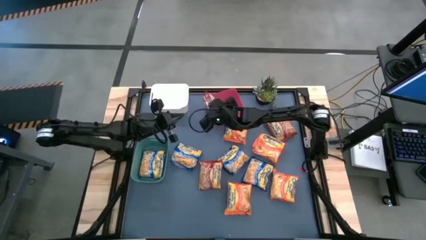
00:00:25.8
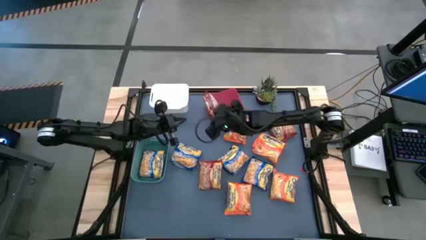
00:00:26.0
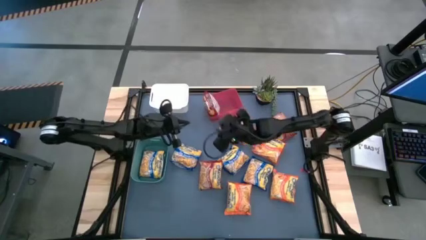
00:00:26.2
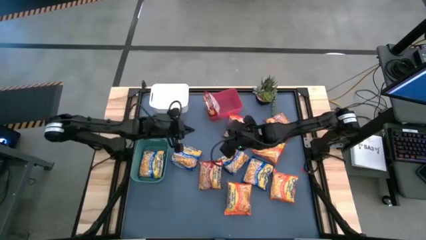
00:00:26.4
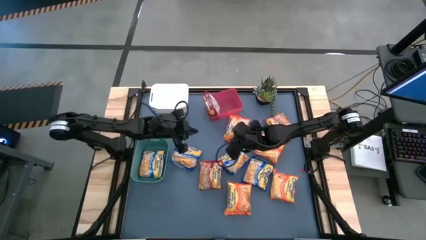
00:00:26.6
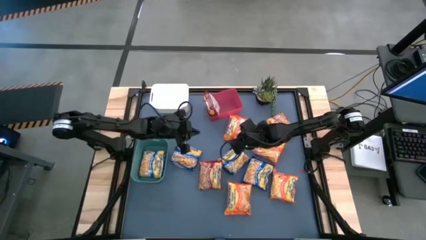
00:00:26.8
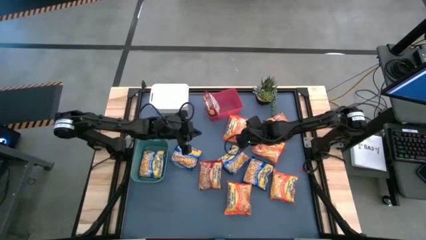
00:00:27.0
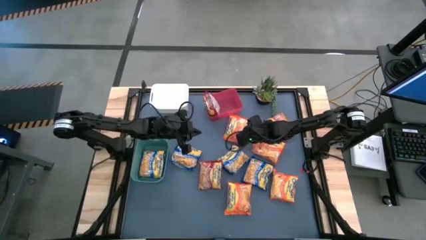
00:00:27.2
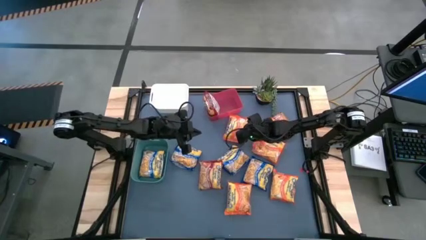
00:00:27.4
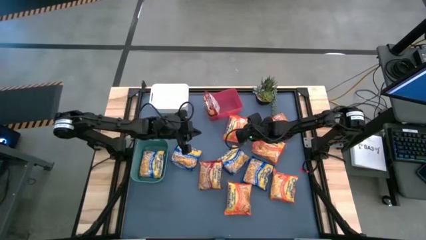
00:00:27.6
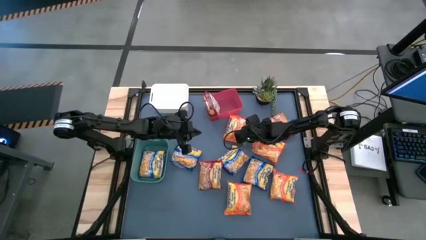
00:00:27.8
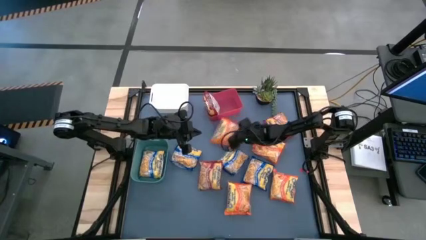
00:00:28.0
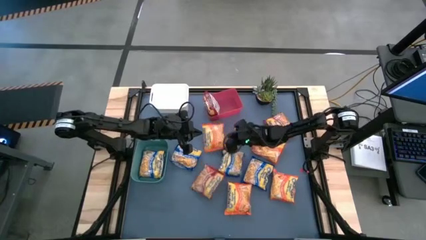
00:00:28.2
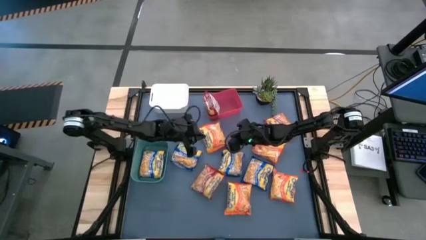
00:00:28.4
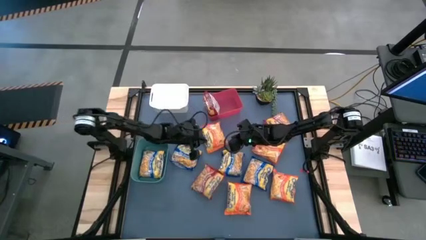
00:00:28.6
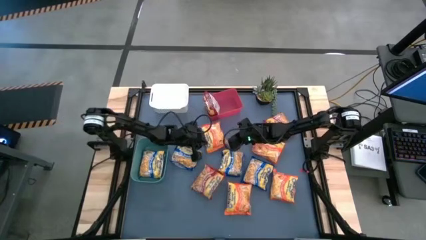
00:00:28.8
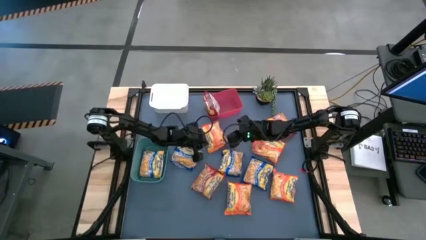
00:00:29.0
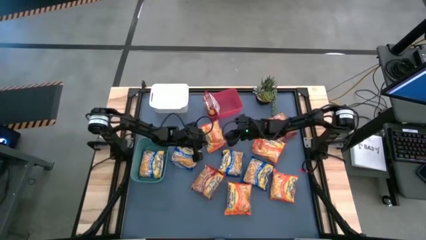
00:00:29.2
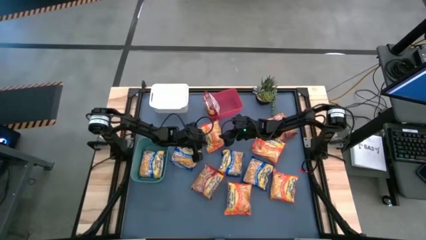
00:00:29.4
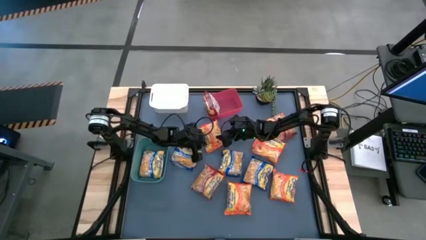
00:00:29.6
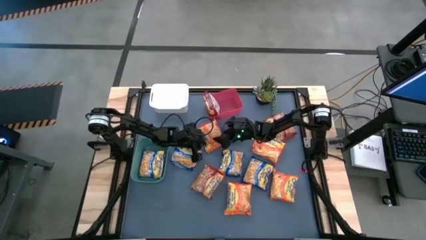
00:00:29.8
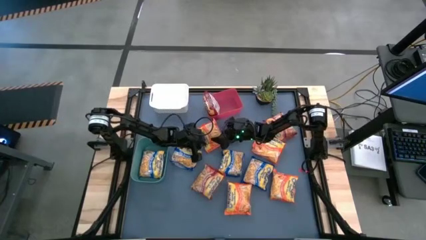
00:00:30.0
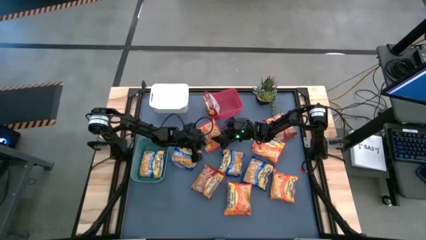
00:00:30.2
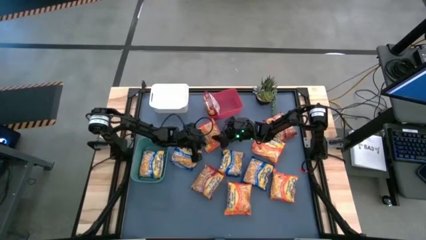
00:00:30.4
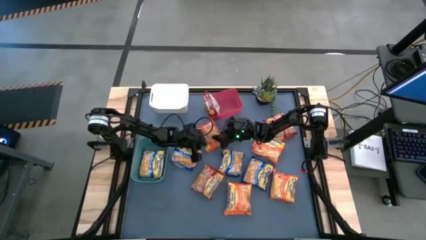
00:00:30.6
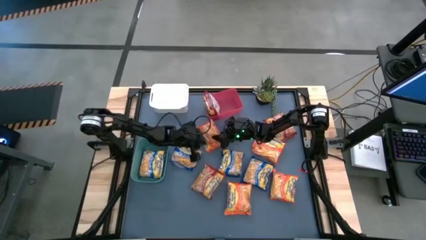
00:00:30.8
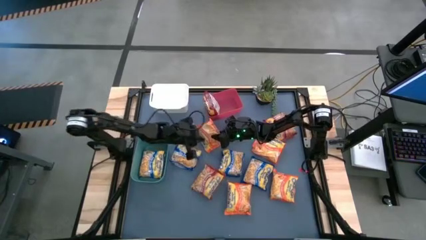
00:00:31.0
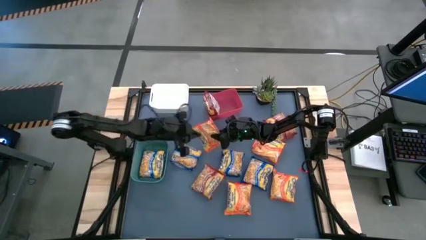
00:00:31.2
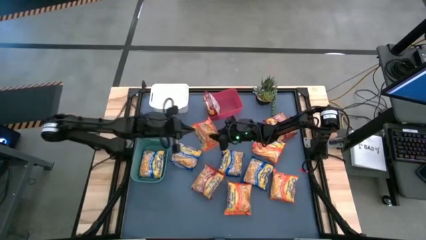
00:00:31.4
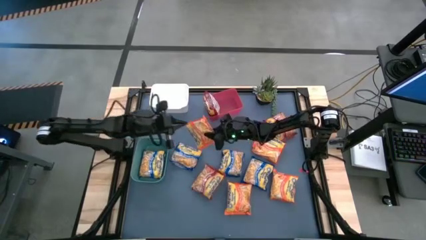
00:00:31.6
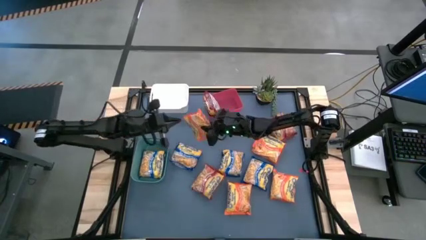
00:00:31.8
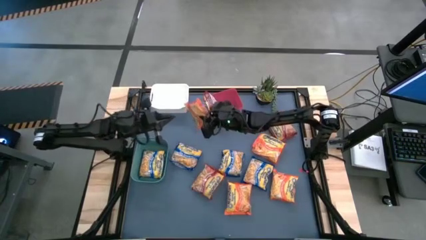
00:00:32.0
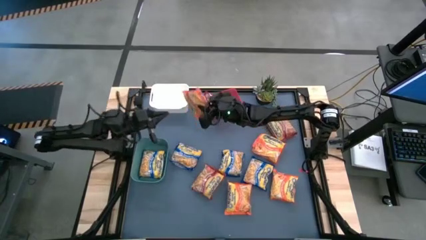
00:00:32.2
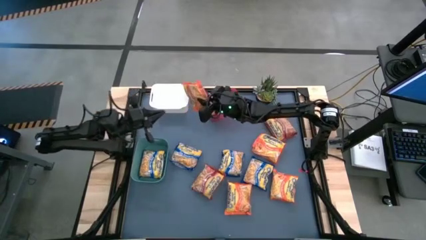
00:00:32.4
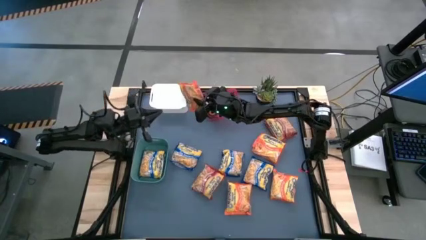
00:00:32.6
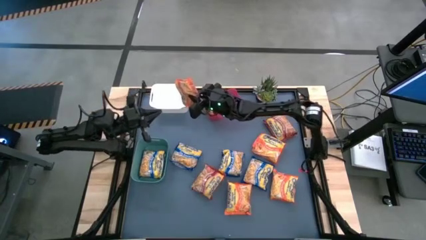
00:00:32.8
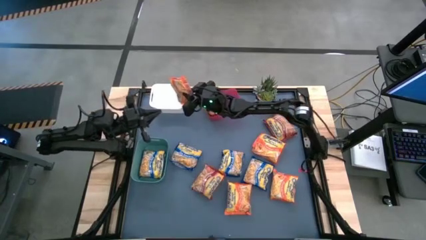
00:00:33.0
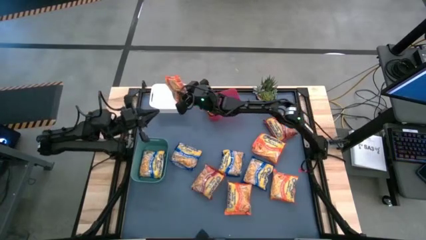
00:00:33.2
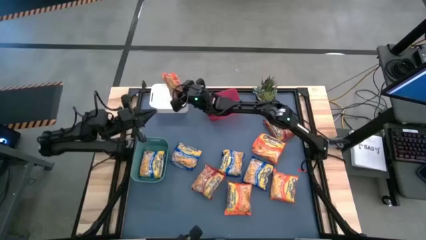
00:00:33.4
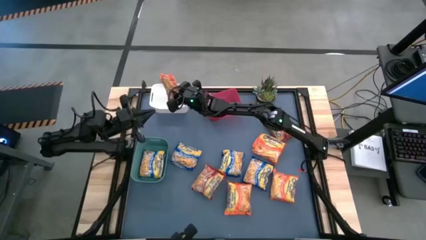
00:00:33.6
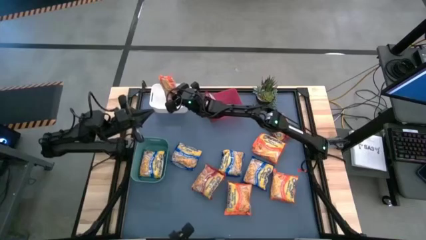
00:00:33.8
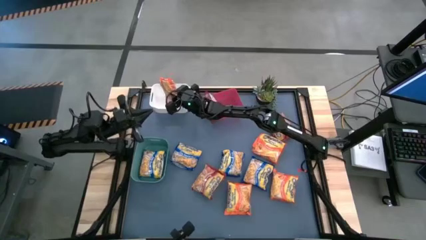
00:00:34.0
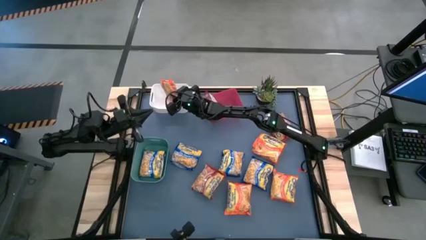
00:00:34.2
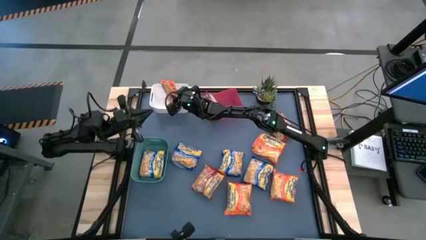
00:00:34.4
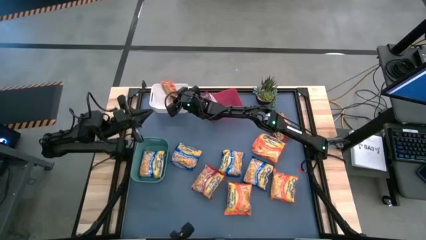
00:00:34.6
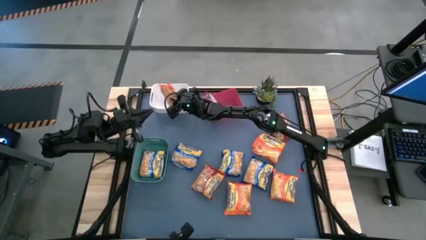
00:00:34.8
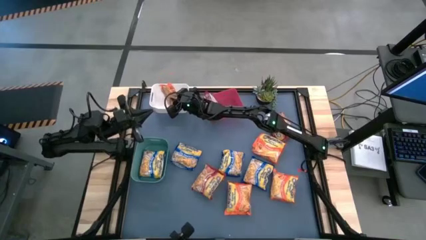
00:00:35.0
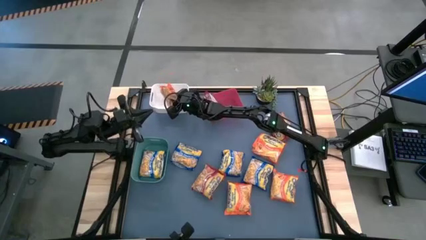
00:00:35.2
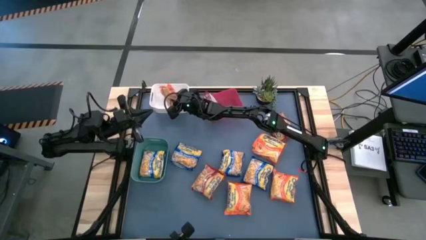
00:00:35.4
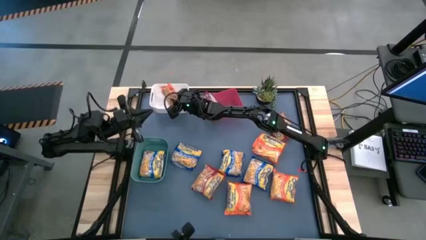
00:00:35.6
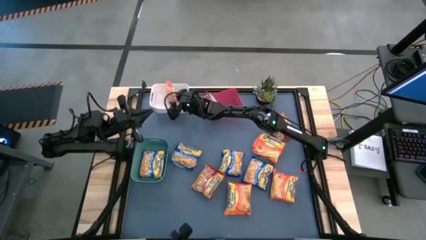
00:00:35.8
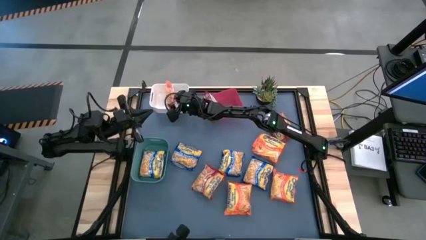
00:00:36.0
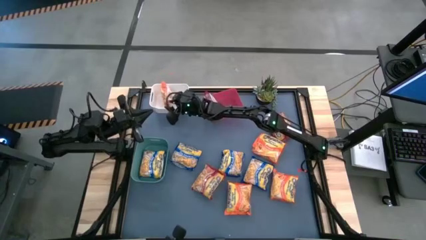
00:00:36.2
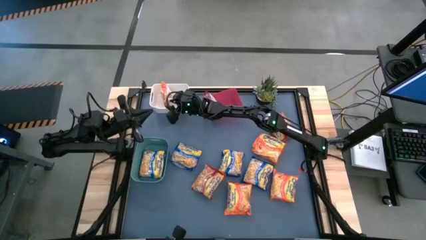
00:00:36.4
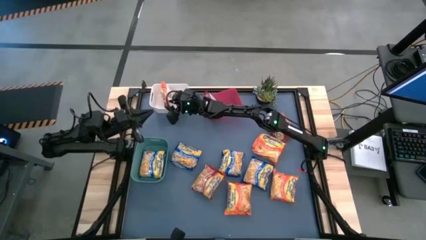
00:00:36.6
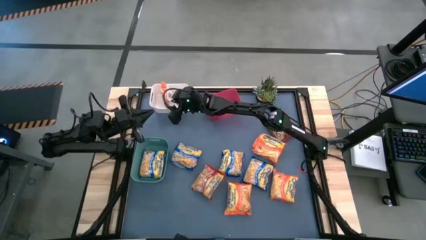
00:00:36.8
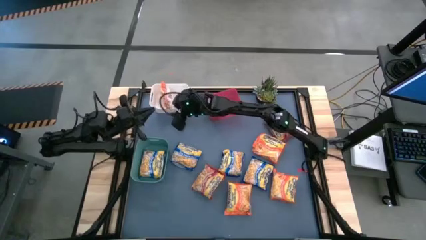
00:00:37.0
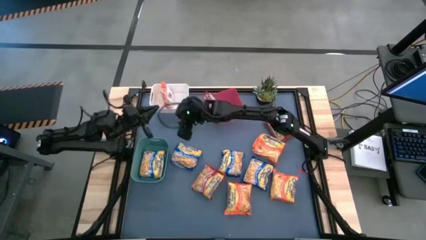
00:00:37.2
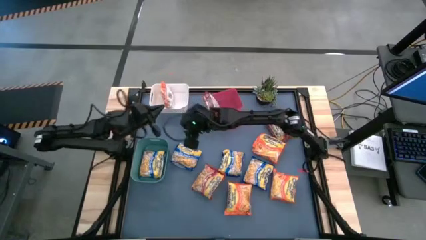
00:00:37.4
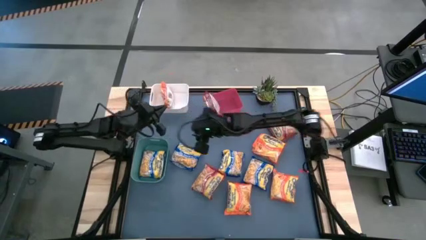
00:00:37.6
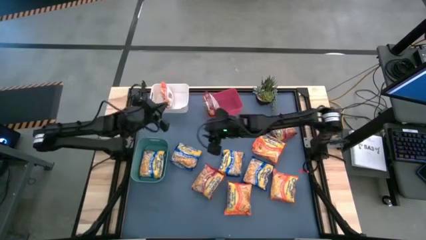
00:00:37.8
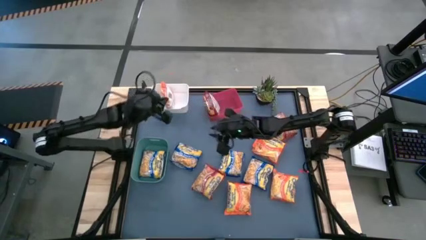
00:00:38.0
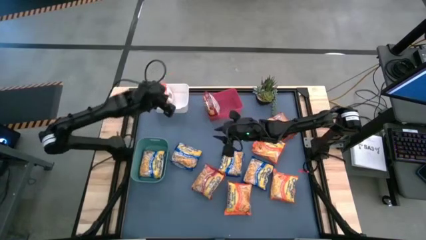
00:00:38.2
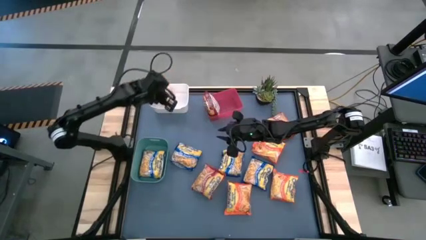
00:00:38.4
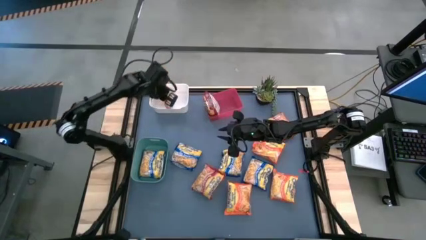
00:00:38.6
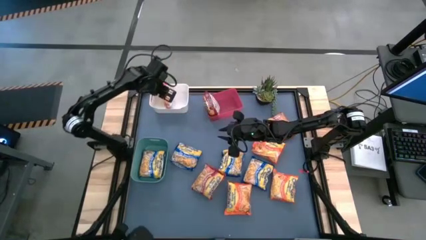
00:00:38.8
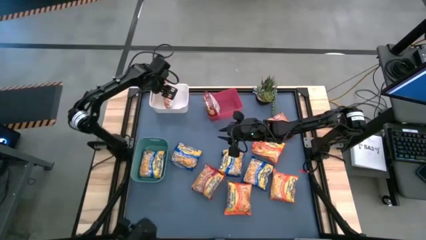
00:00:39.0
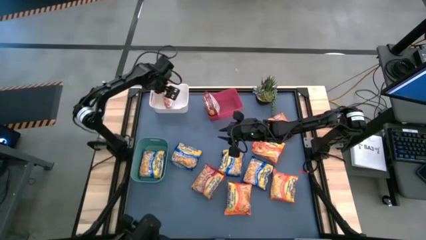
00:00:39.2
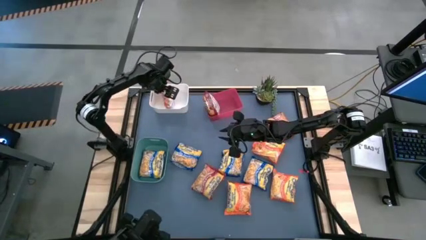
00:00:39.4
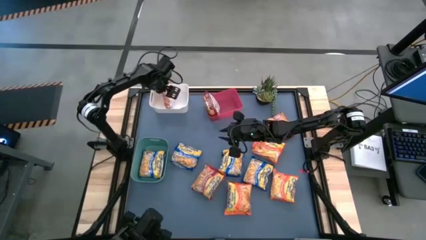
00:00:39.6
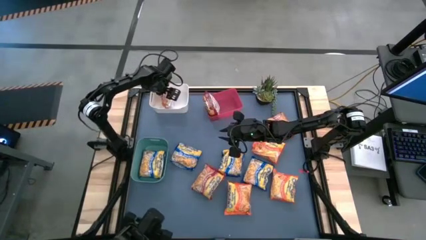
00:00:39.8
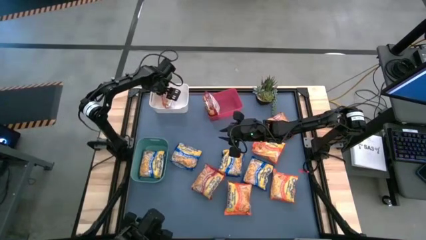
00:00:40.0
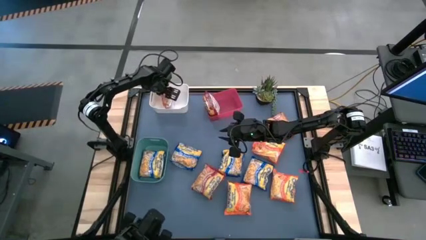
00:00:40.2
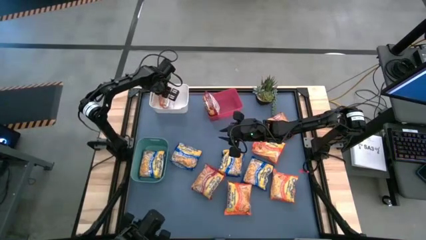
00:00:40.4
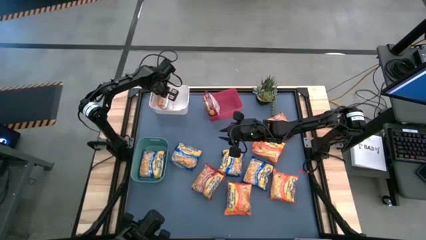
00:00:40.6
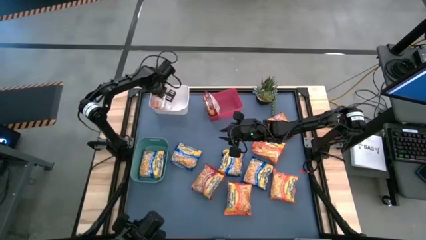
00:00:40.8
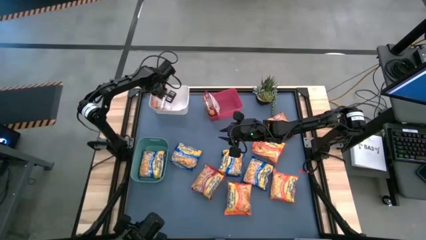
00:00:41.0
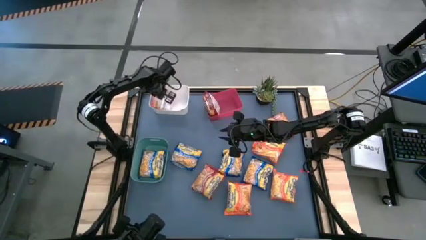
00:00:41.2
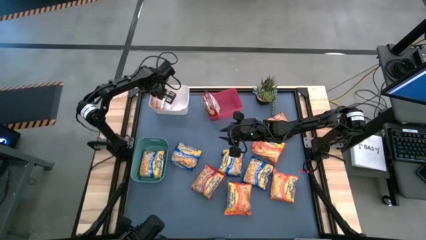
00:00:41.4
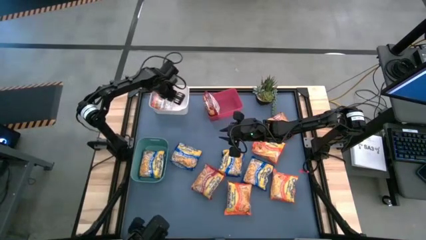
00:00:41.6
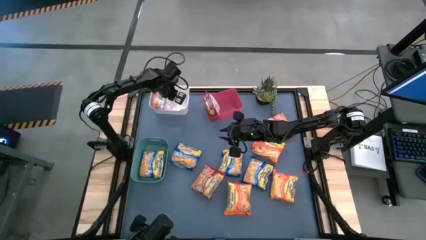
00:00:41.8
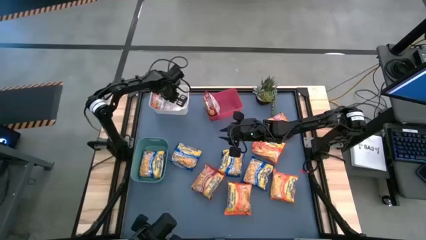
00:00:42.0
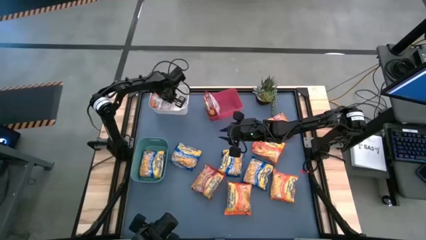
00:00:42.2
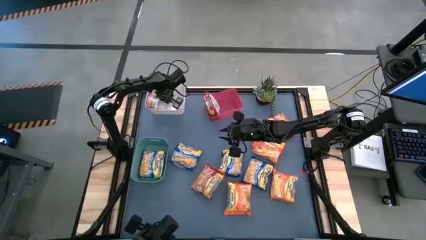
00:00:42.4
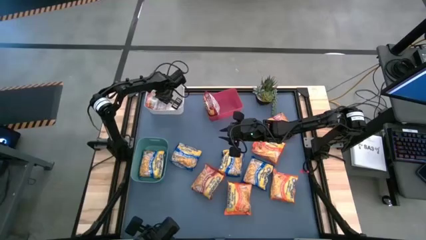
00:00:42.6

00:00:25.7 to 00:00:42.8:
Task: Sort Maruchan noodles
Put the orange noodle pack into the white bin
